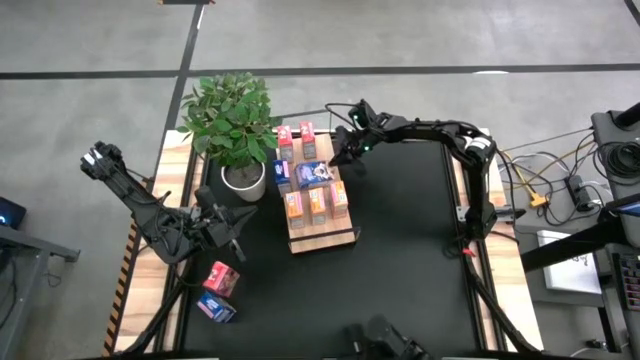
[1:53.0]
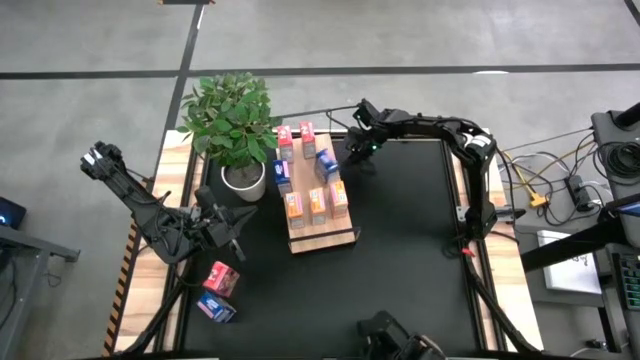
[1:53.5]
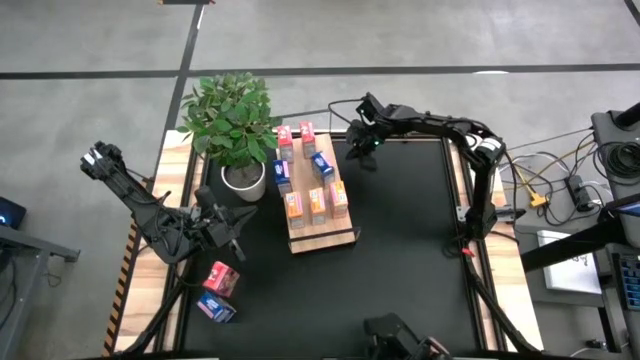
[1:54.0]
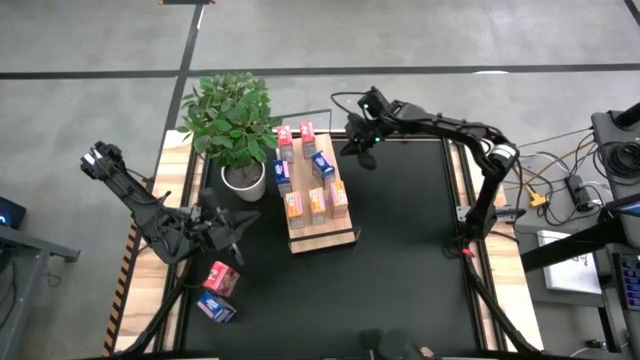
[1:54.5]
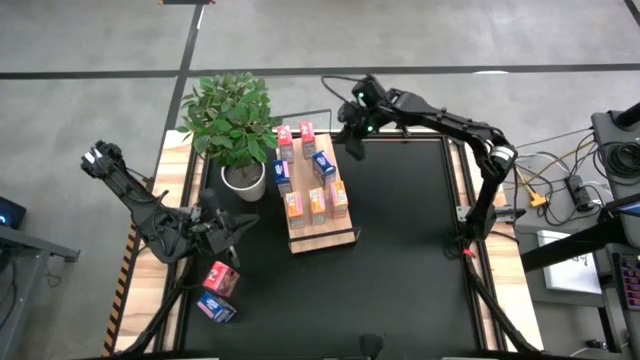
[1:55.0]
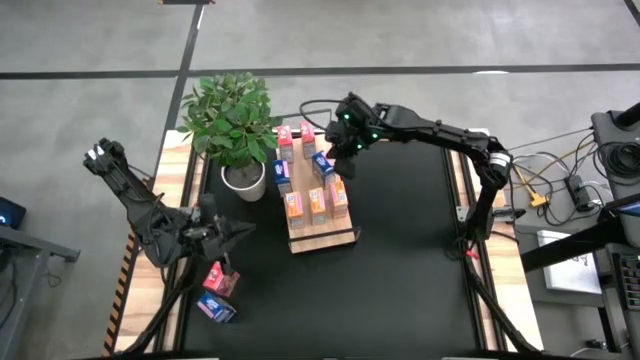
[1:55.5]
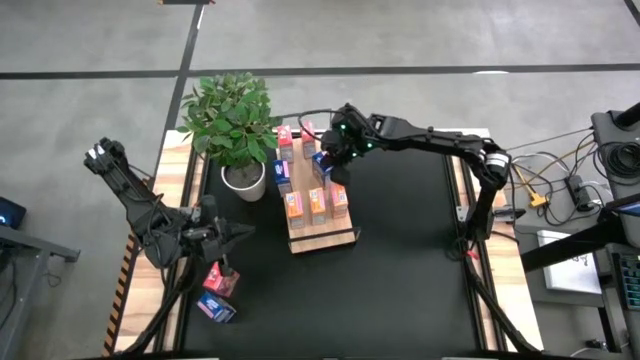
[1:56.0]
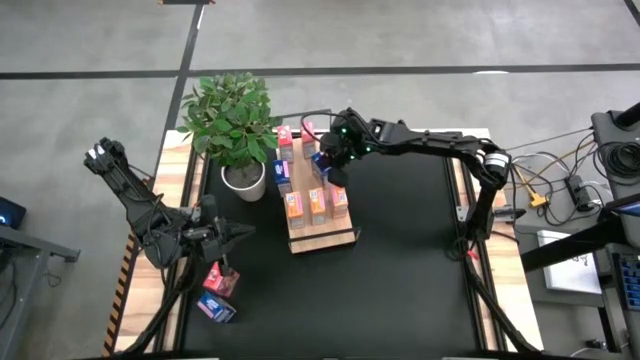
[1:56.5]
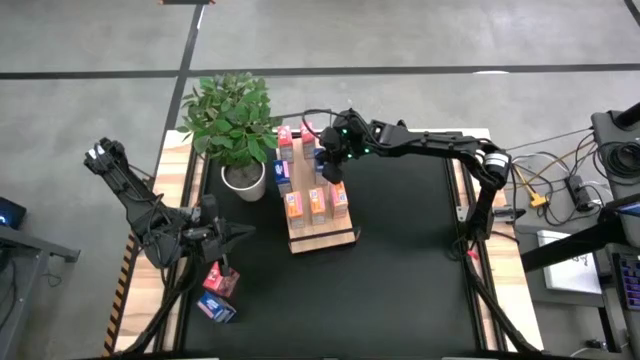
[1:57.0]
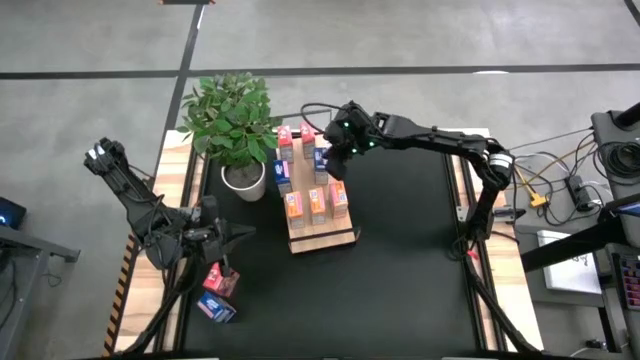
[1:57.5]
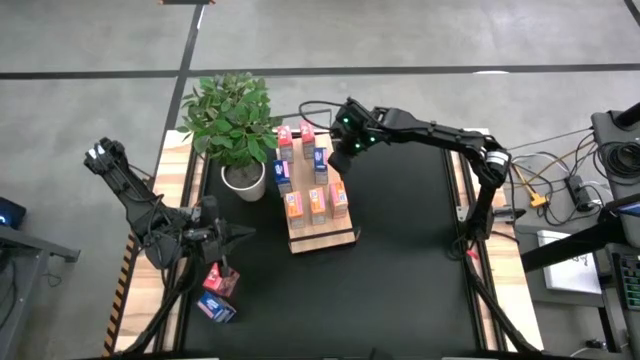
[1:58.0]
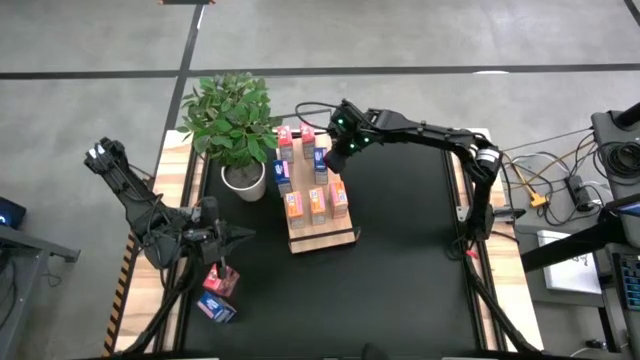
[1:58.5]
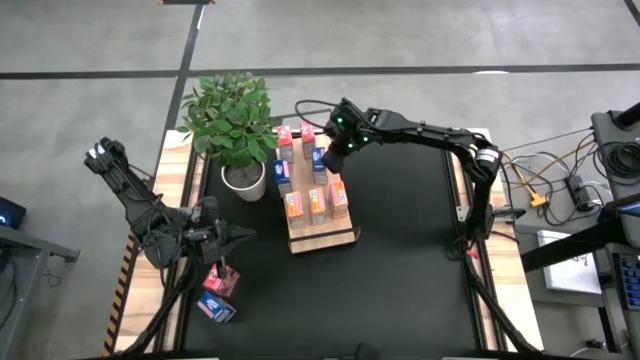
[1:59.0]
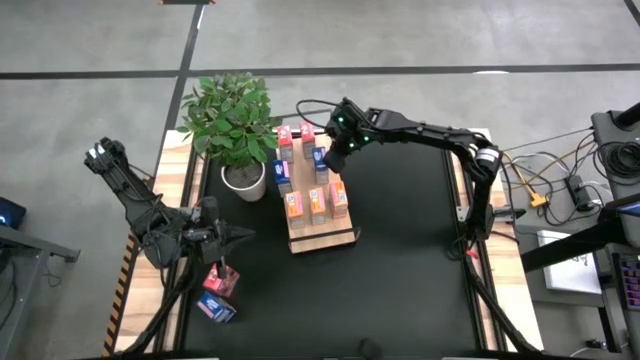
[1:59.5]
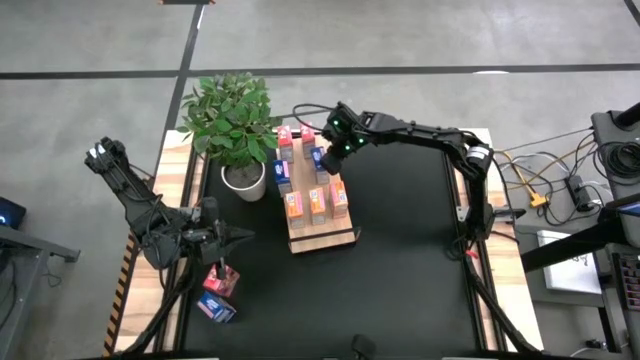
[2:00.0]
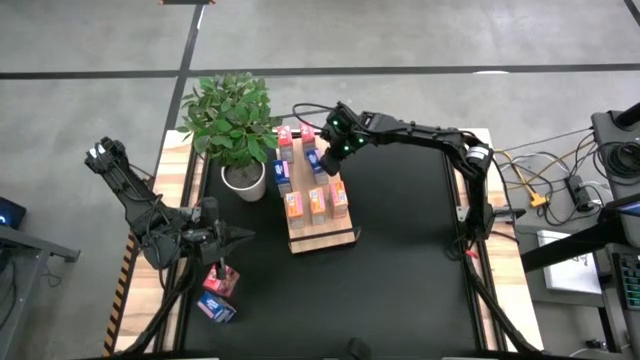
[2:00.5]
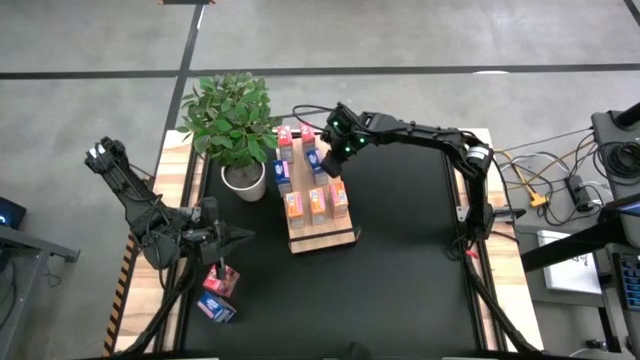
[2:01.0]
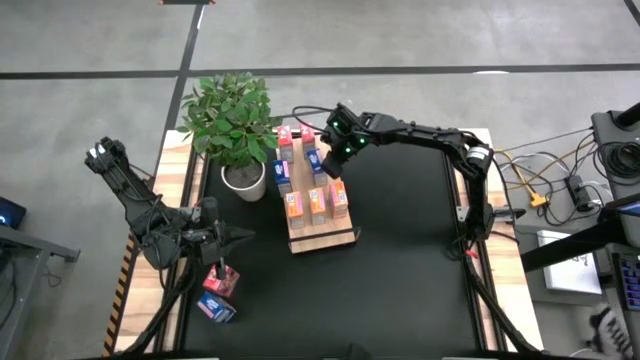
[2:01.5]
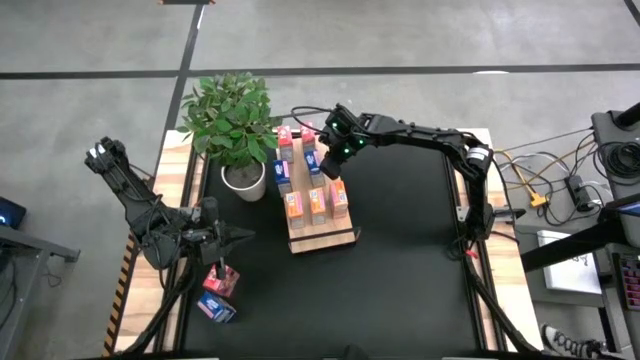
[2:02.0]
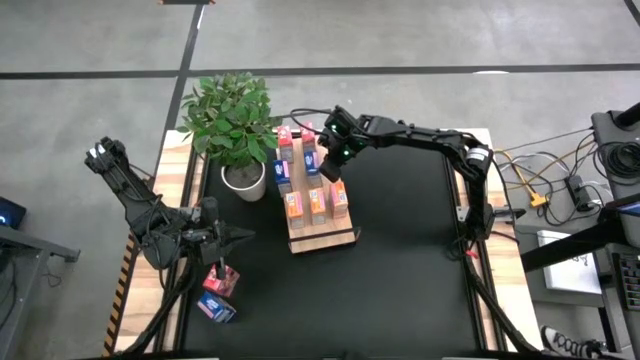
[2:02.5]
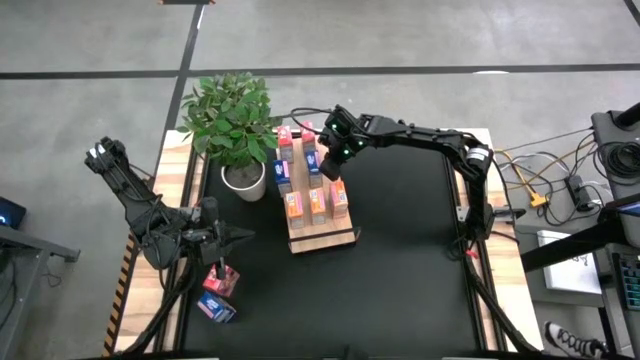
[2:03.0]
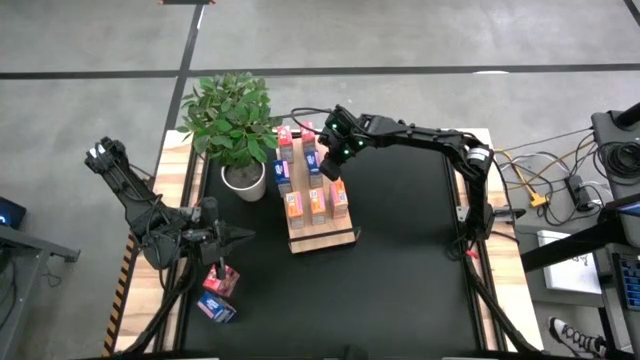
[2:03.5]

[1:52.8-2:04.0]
Task: Stack cereal on shelf
Put the bottom blue cereal box on the shelf aligned with the other blue cereal box

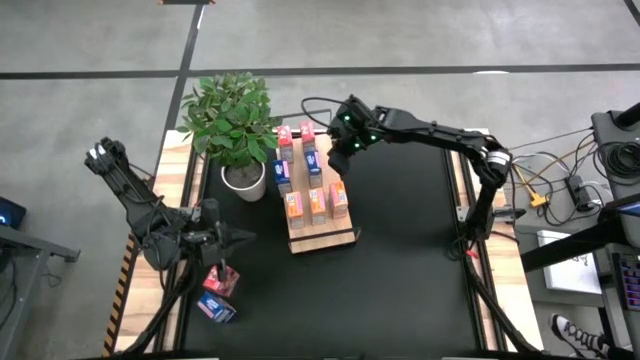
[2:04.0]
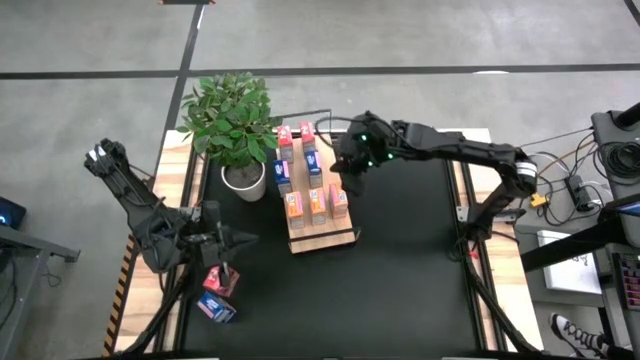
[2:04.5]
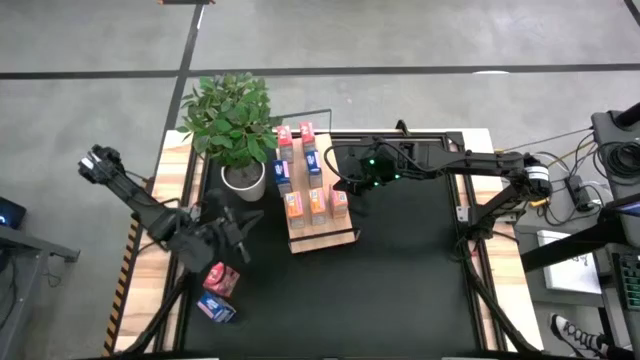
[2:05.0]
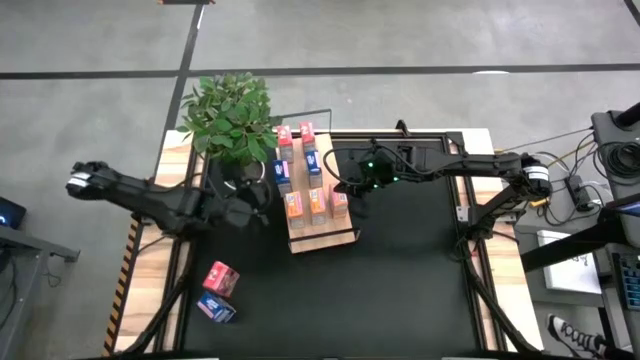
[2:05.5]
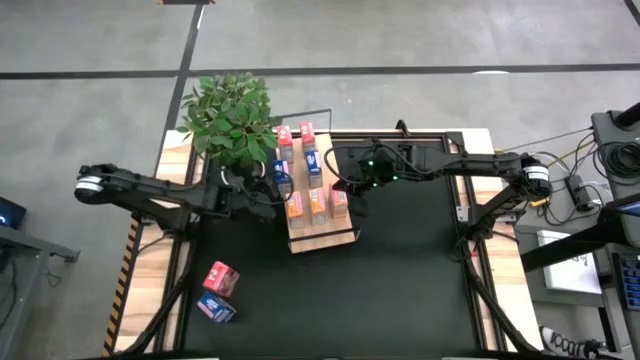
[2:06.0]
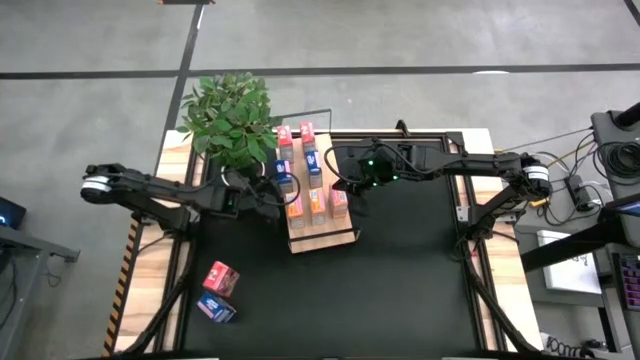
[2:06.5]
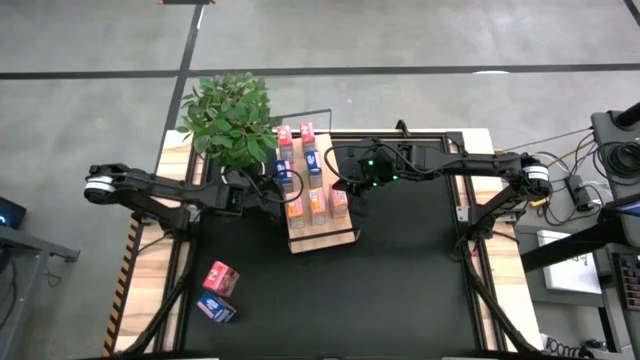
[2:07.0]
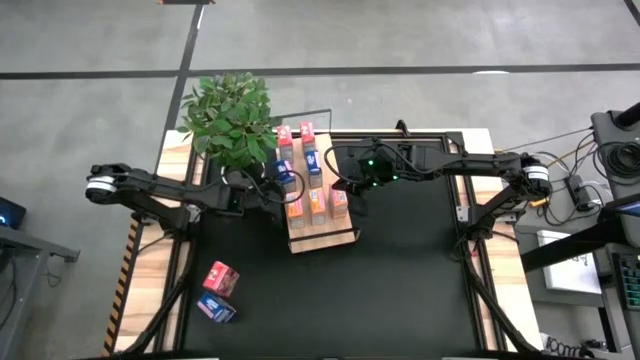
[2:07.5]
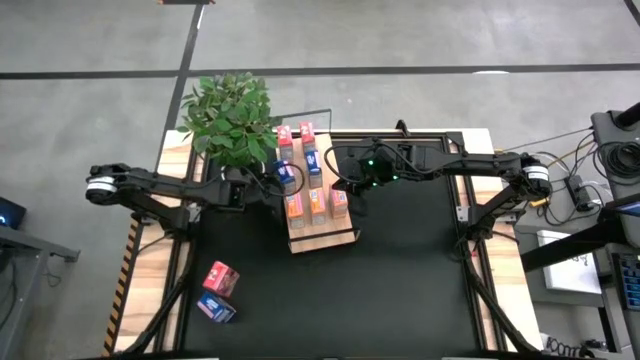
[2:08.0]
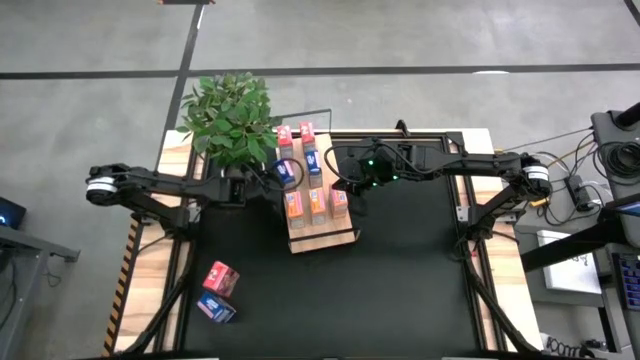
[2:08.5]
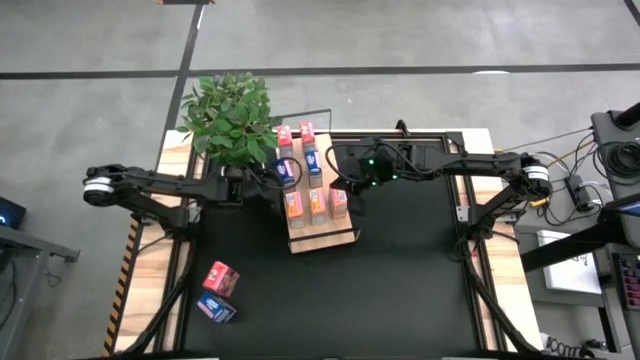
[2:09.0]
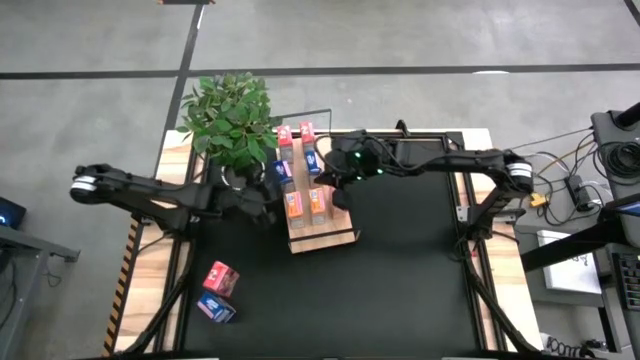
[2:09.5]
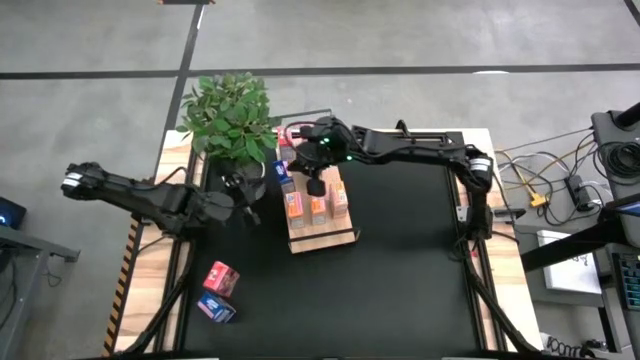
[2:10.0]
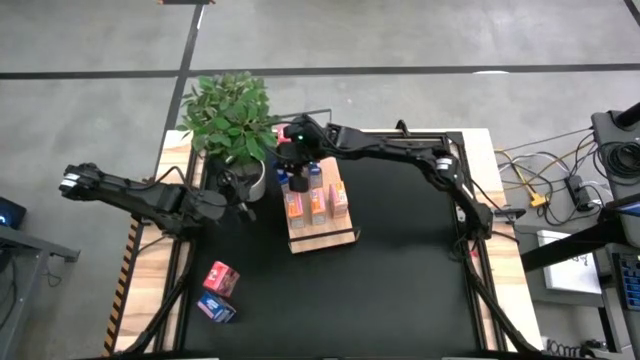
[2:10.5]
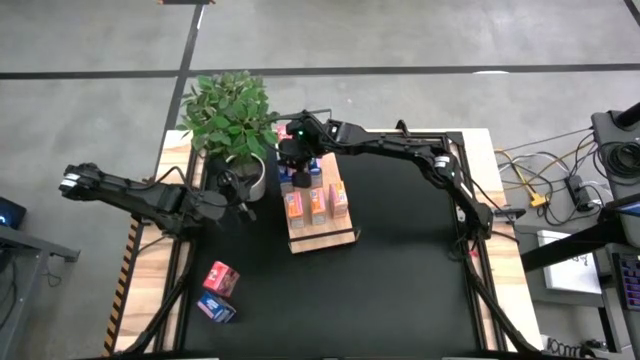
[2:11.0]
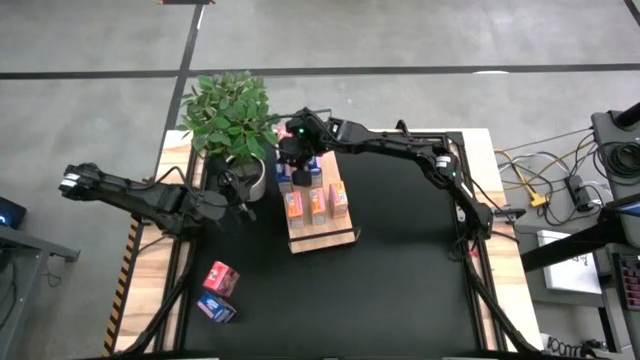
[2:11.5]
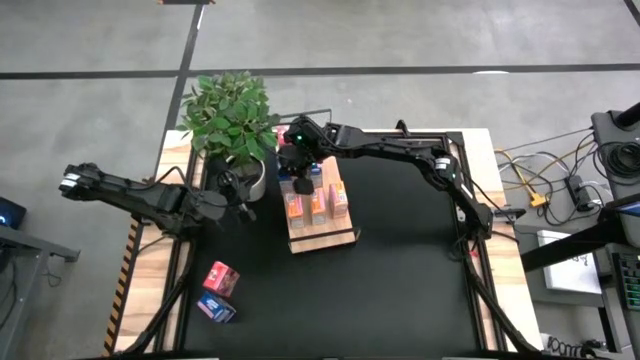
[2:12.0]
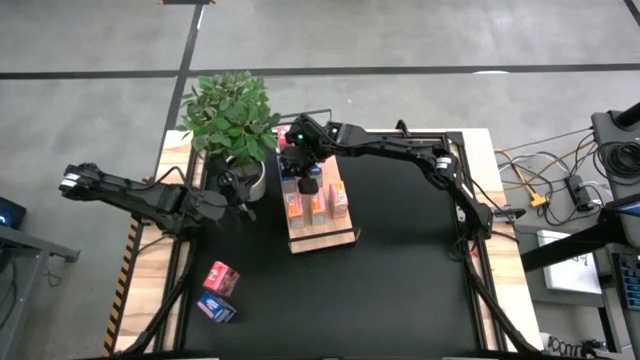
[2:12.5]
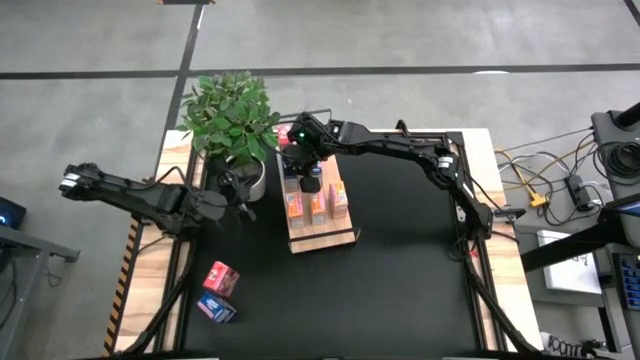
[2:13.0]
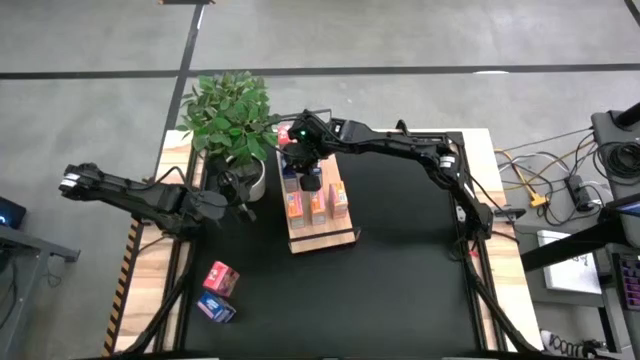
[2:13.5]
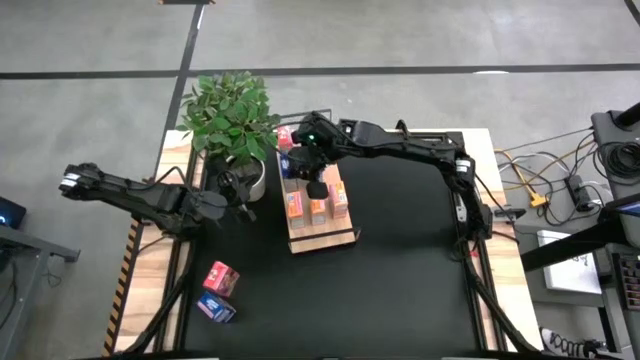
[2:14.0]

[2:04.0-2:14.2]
Adjust the blue cereal box on the shelf
